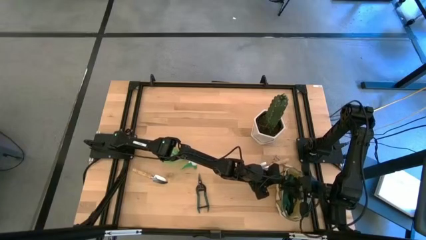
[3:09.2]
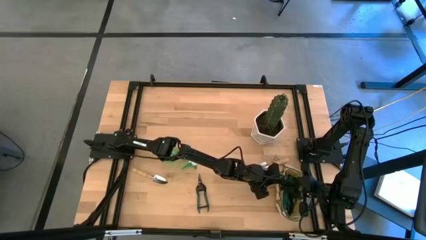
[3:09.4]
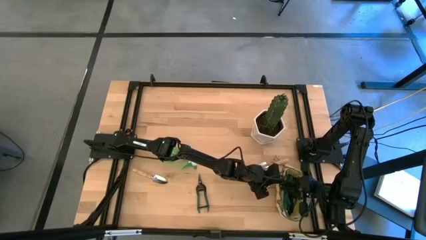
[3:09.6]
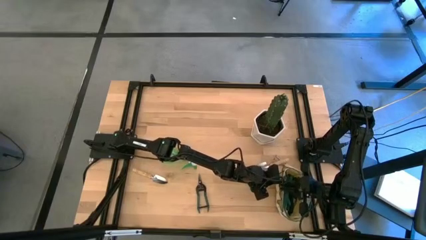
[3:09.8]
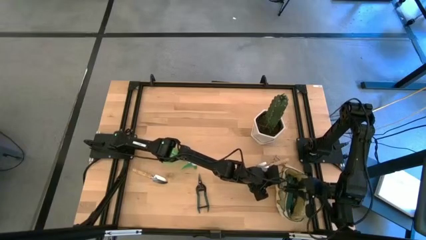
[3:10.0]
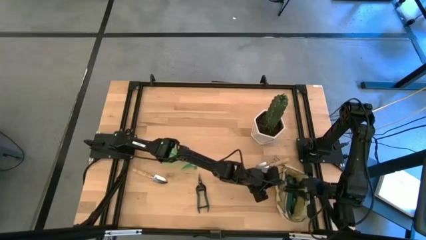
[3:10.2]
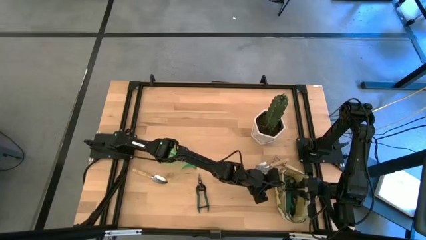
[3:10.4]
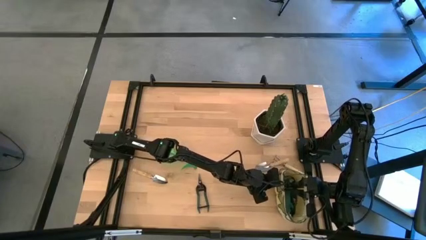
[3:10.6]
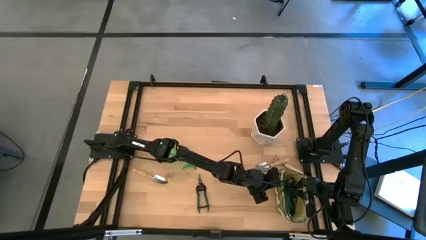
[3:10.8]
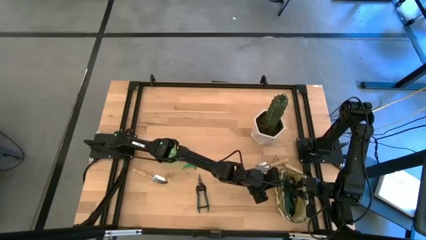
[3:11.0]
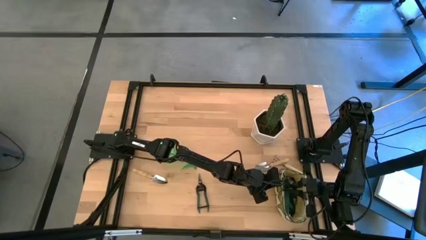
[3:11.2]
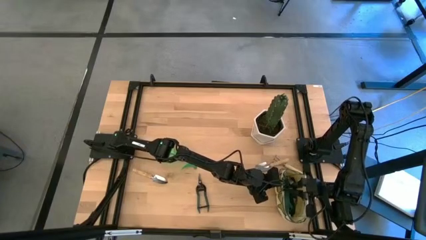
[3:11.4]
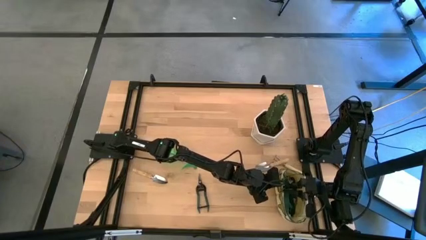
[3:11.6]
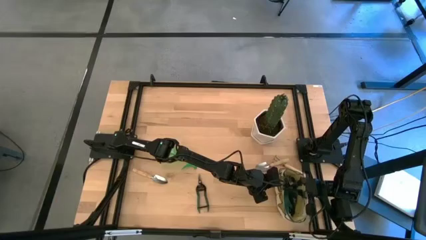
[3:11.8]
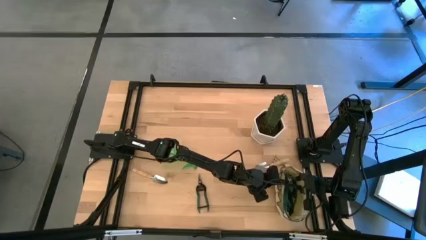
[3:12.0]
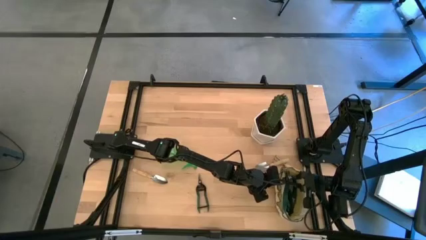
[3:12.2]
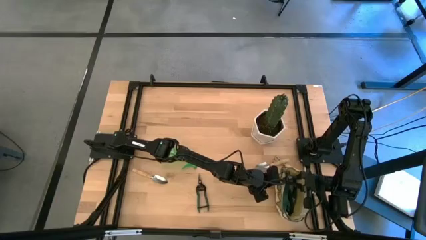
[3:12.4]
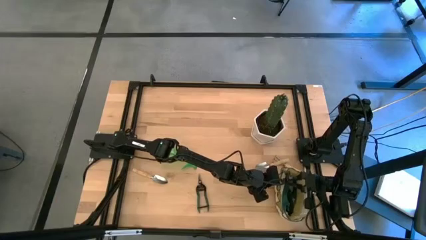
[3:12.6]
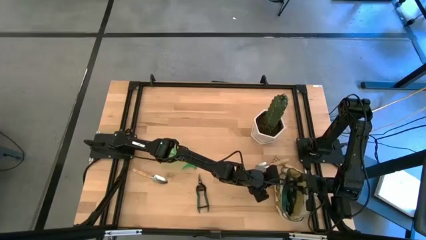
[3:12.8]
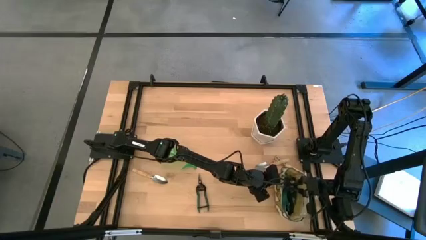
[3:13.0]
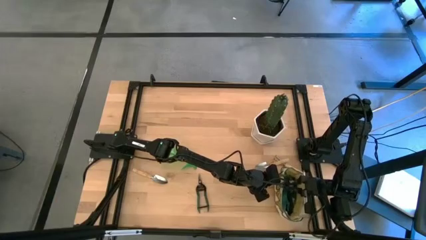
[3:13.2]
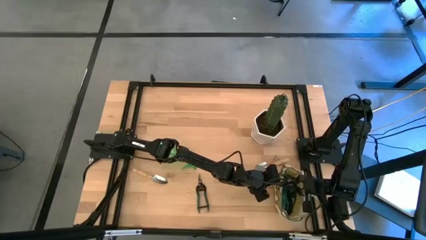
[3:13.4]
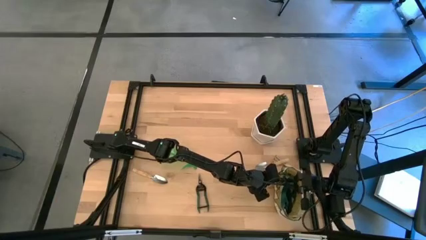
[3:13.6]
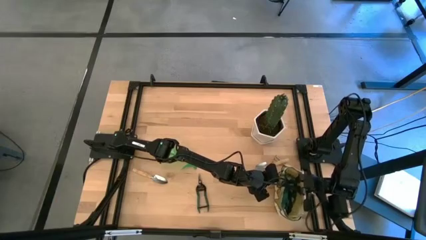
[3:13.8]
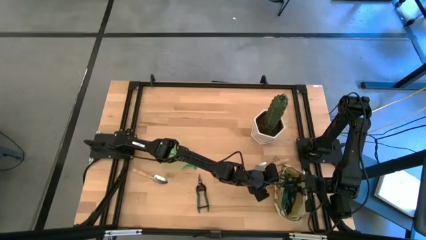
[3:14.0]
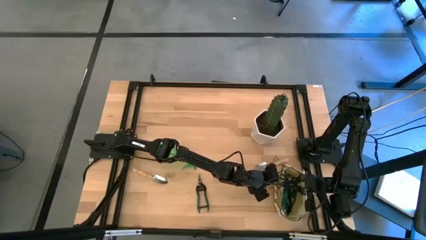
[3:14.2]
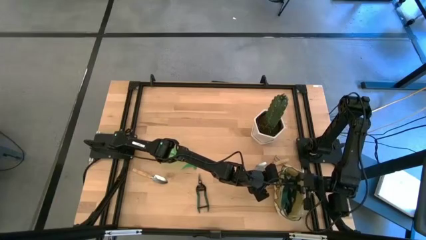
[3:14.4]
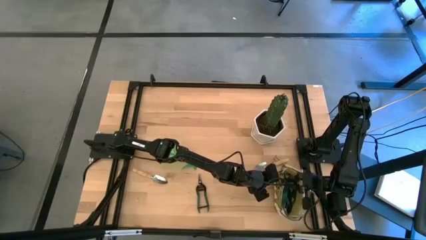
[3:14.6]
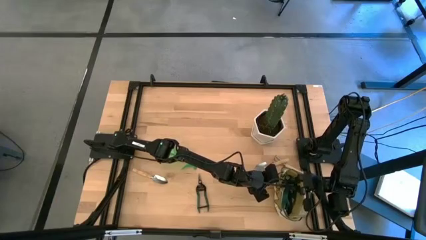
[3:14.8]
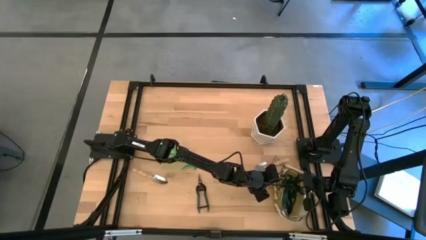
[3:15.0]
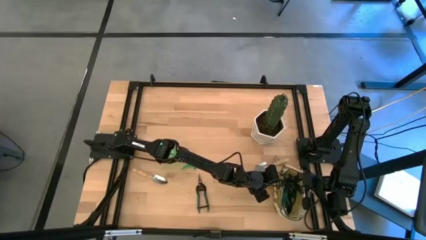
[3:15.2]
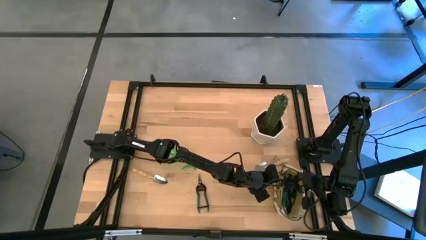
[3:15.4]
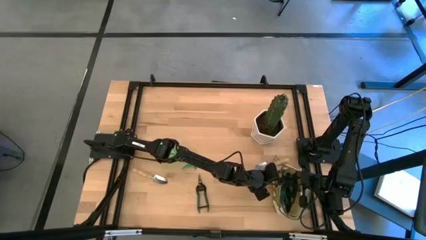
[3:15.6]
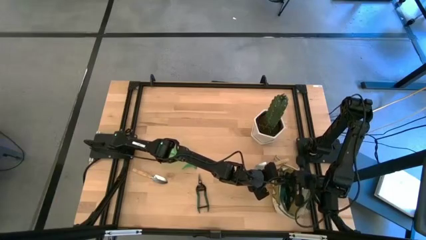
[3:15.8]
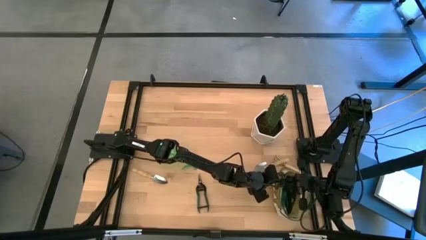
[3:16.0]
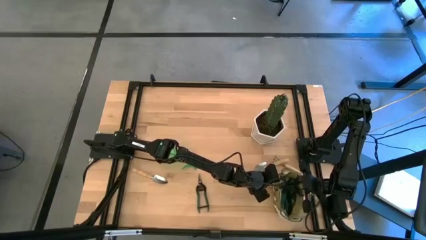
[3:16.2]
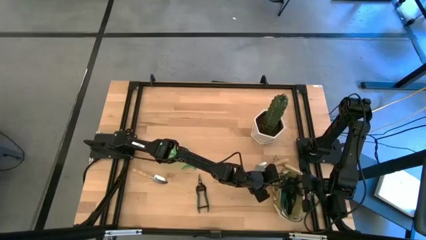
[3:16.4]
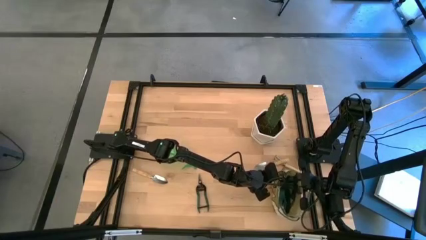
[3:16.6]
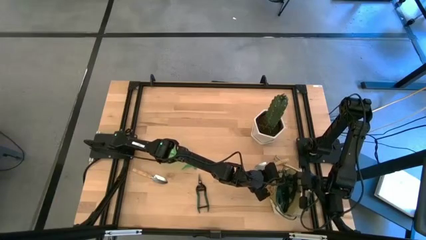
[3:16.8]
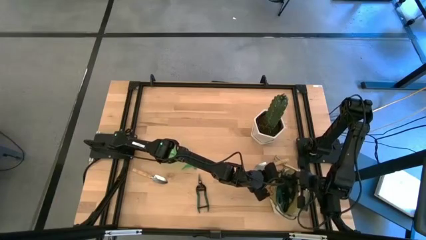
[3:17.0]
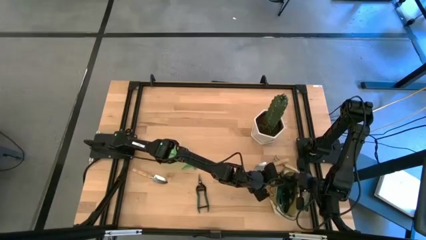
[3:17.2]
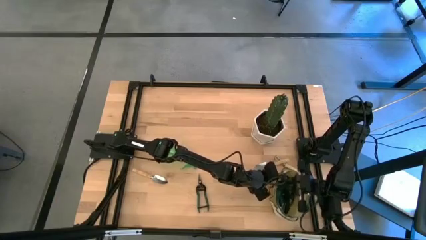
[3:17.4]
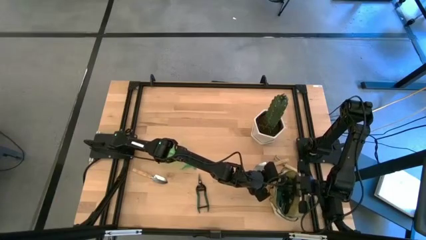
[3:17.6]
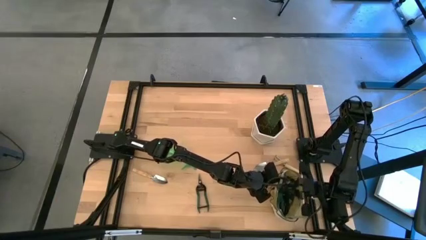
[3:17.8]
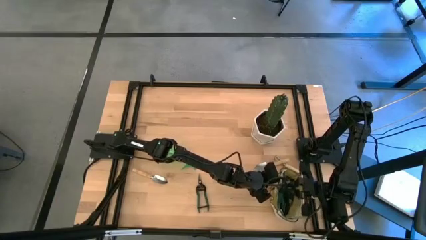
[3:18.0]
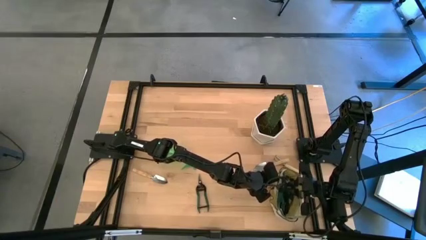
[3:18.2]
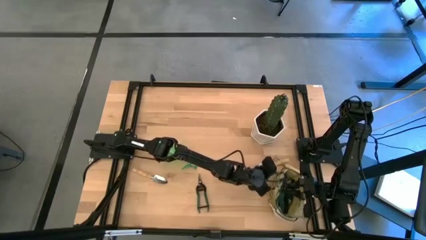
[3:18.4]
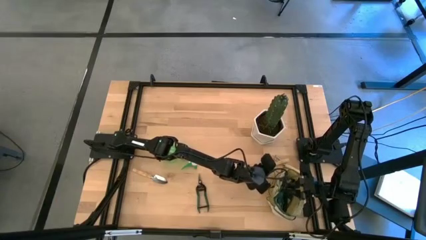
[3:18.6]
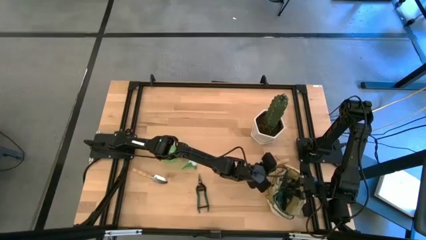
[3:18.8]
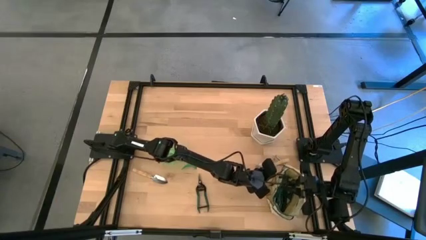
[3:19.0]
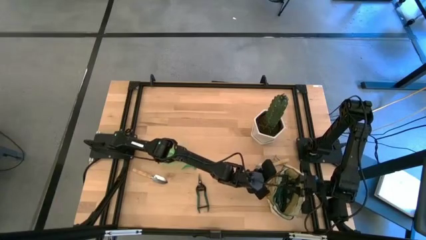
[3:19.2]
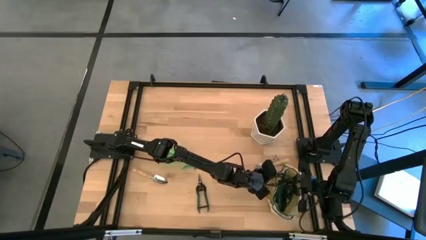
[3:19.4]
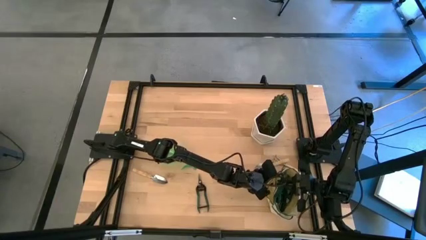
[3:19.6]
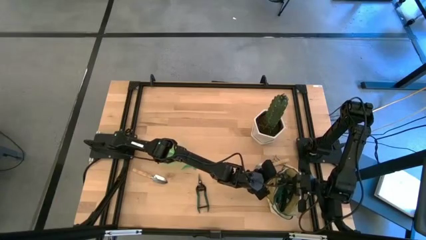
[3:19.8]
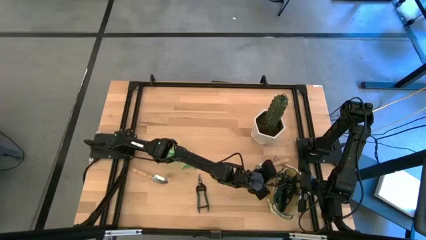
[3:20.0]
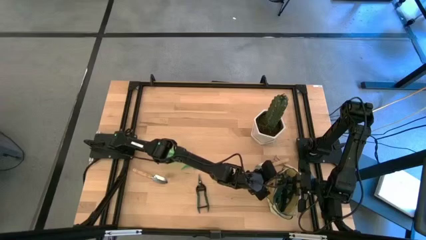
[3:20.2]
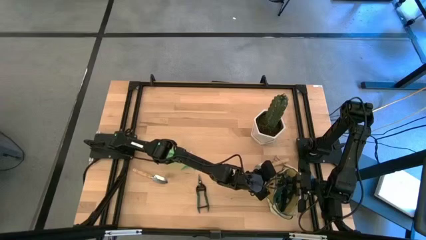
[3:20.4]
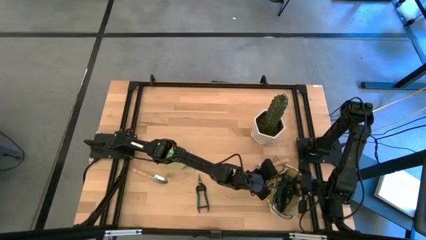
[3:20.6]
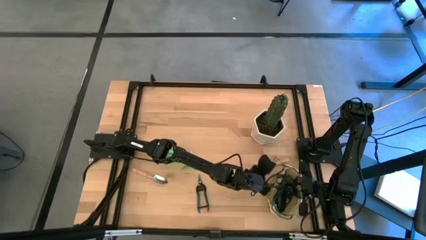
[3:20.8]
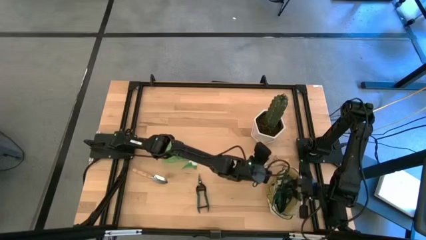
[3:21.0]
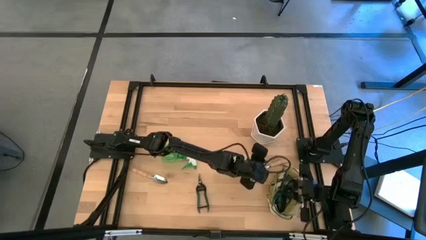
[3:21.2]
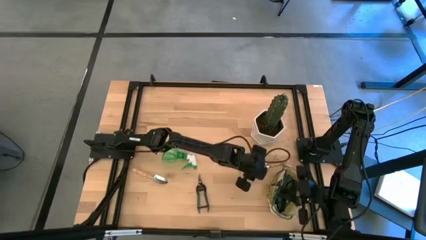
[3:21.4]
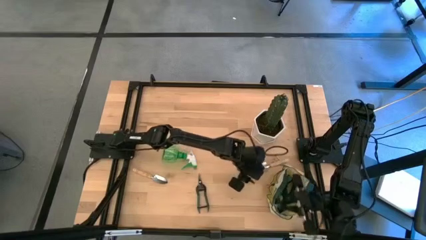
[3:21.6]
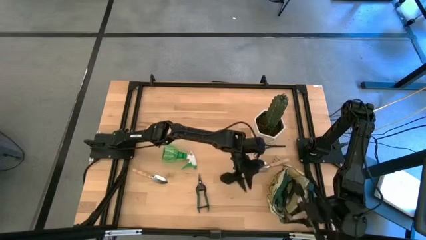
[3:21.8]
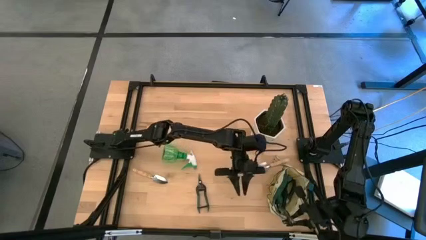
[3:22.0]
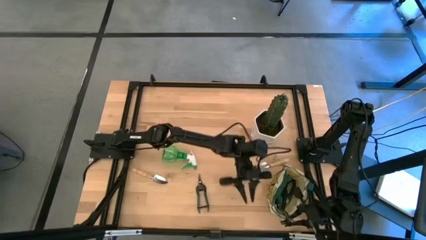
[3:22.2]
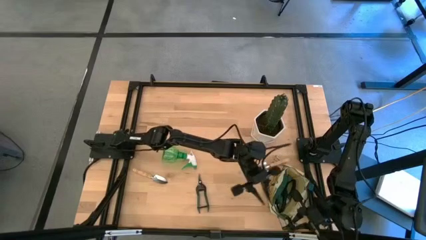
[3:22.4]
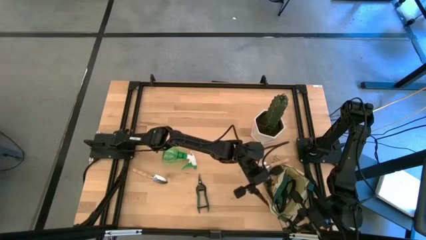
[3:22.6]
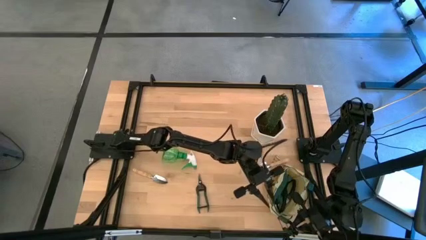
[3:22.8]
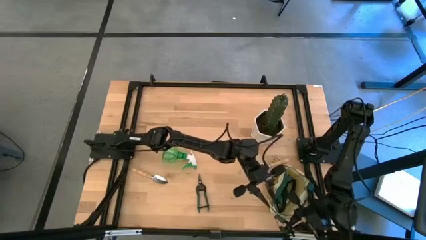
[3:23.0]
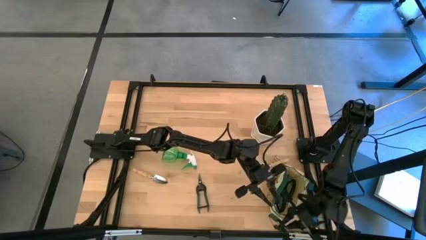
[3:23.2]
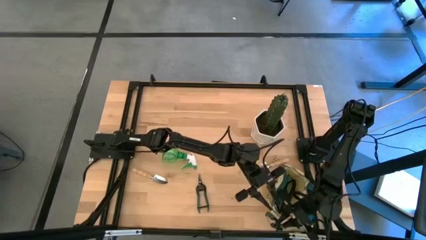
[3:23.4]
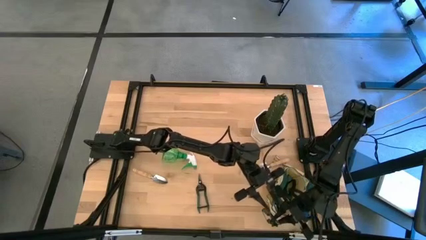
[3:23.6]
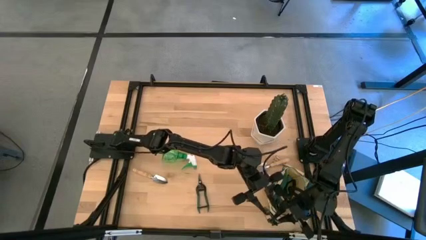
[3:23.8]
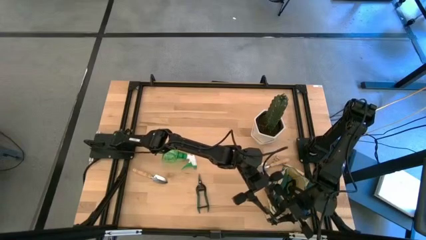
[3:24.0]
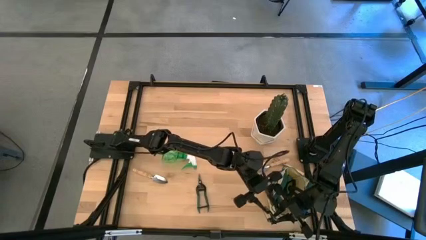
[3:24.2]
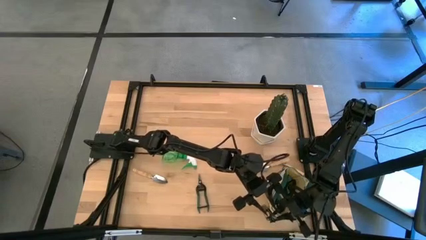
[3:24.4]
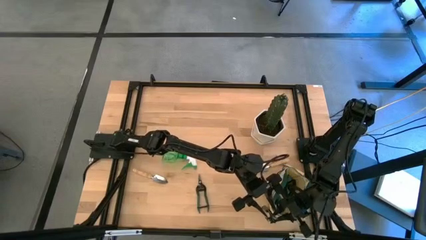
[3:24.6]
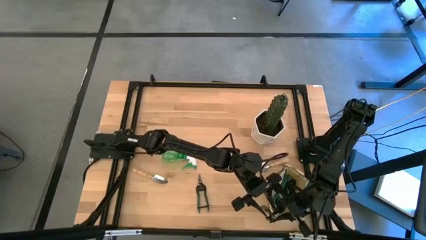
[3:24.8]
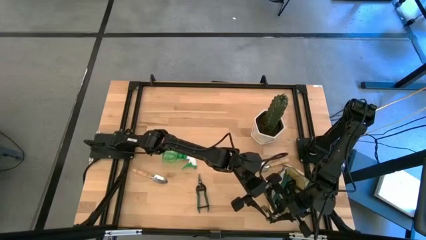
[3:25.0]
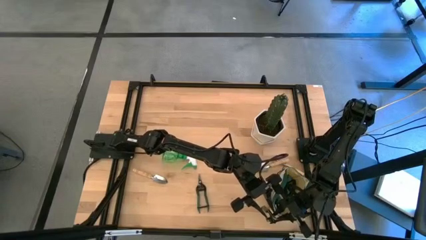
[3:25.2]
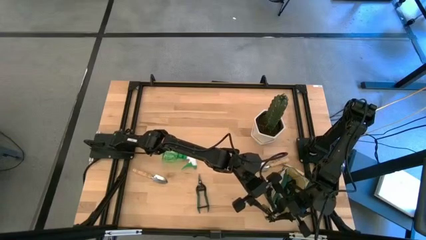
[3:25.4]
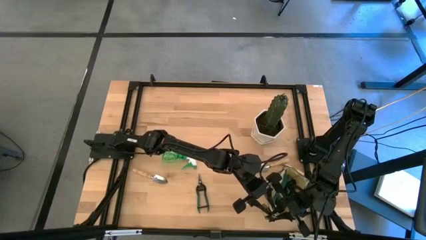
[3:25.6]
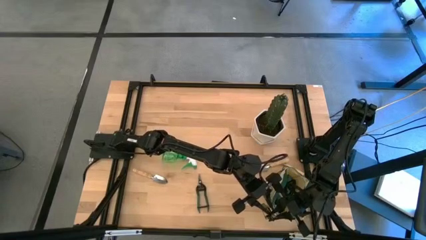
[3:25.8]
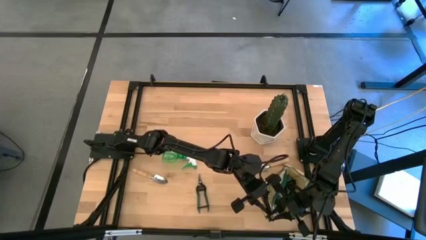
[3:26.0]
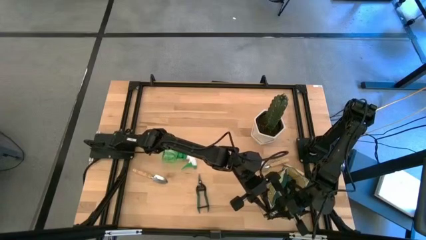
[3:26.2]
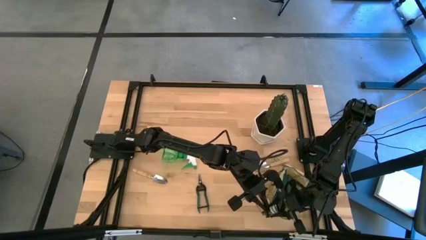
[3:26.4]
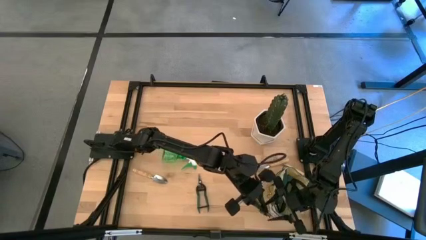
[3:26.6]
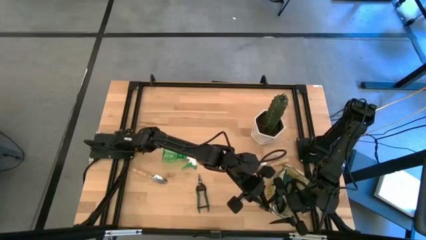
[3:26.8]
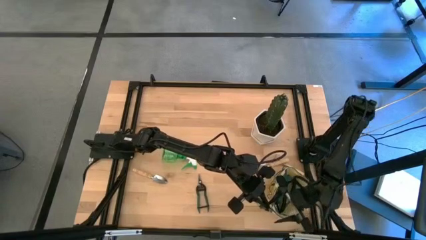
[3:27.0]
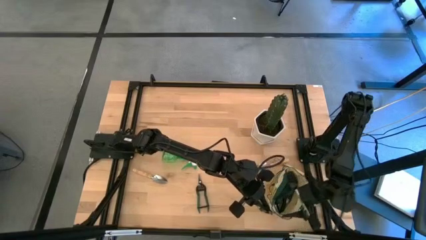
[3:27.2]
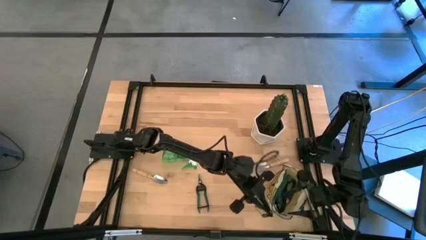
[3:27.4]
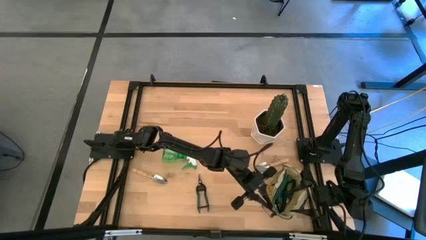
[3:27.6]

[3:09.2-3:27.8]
Task: Pick & Place Garden tools in Gardening bag
Put the top grafting pruner into the side pocket of the white bag
